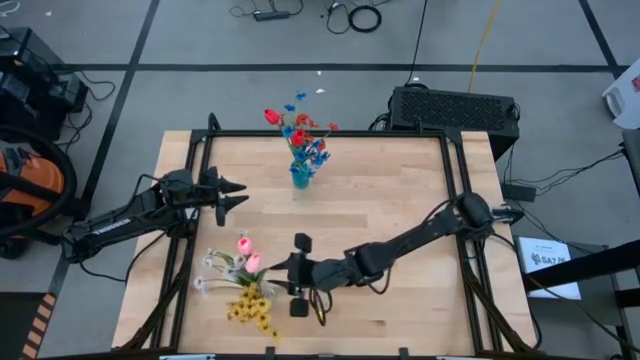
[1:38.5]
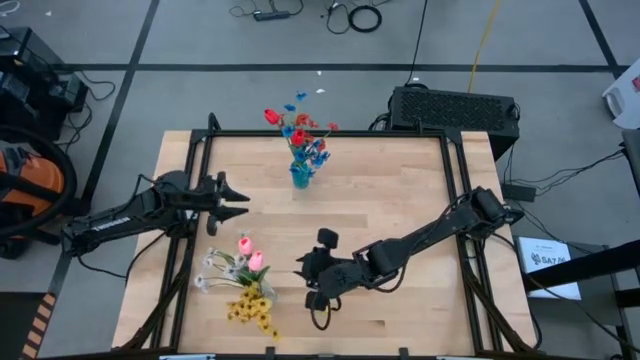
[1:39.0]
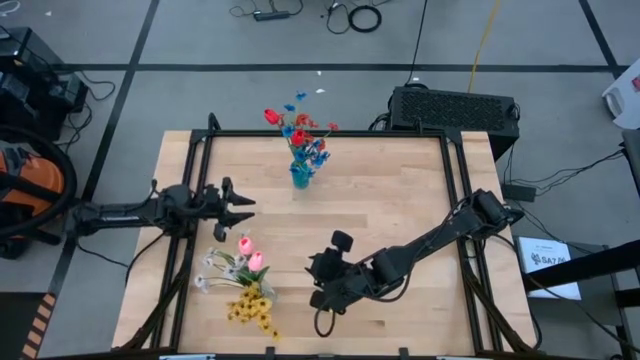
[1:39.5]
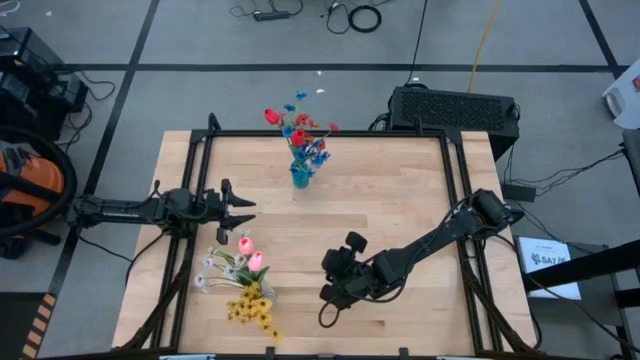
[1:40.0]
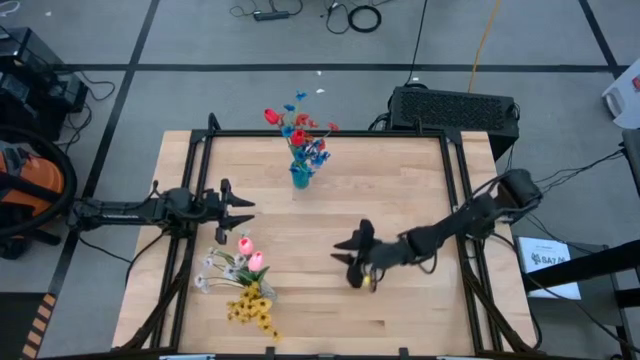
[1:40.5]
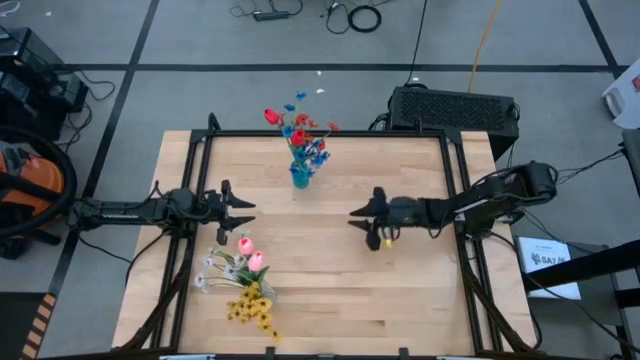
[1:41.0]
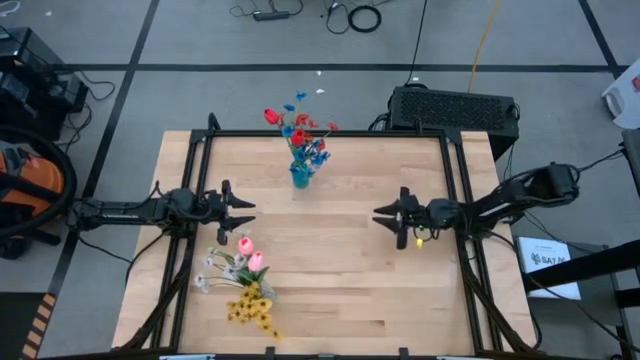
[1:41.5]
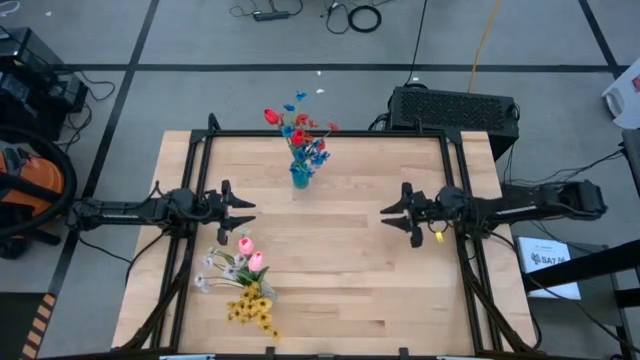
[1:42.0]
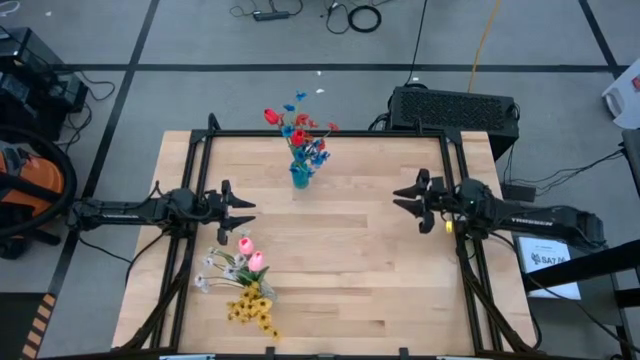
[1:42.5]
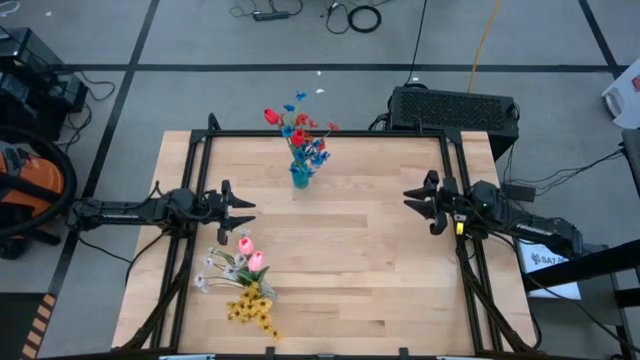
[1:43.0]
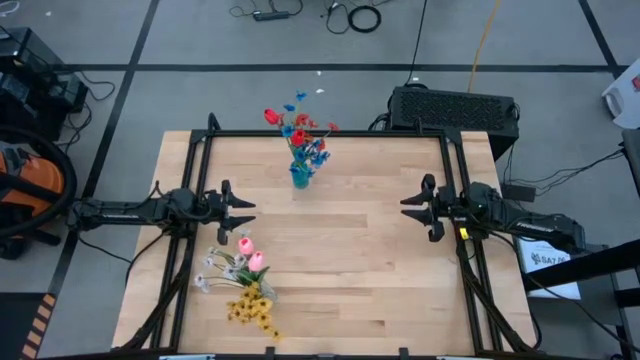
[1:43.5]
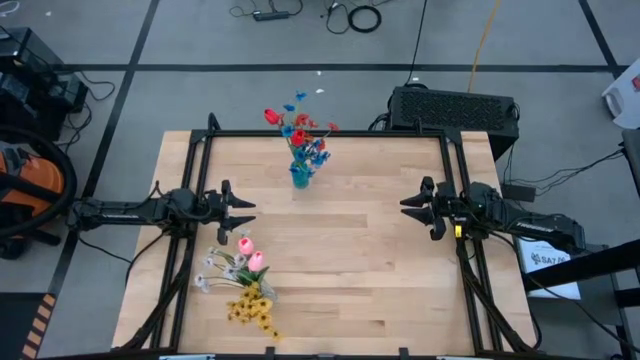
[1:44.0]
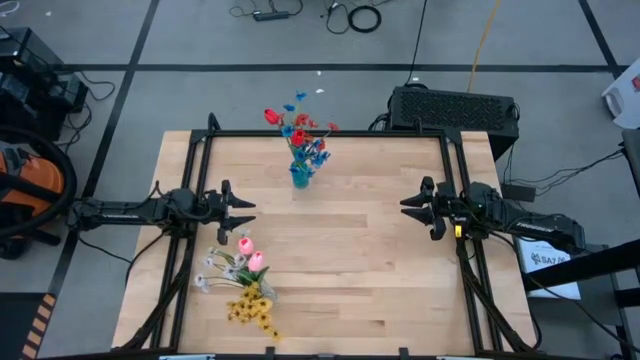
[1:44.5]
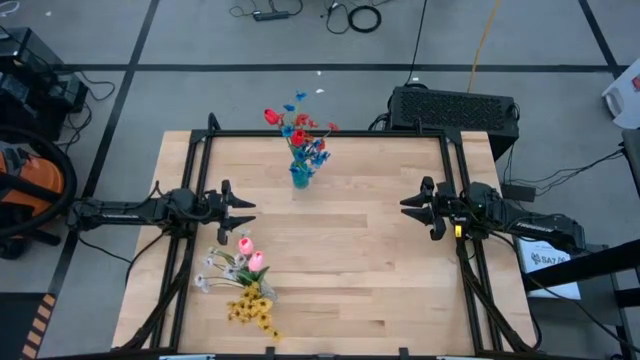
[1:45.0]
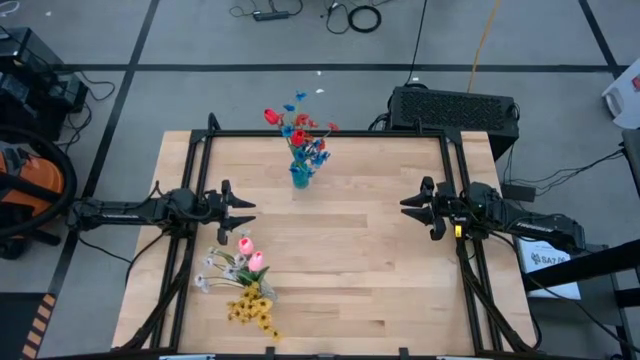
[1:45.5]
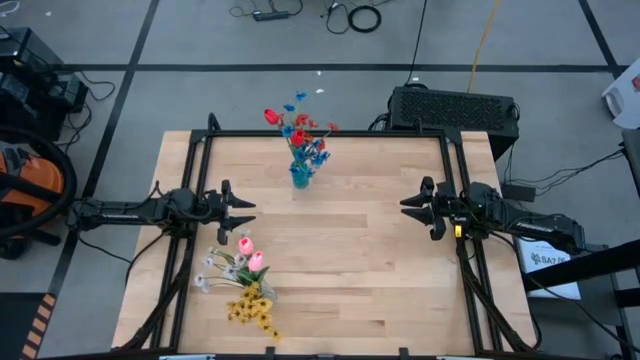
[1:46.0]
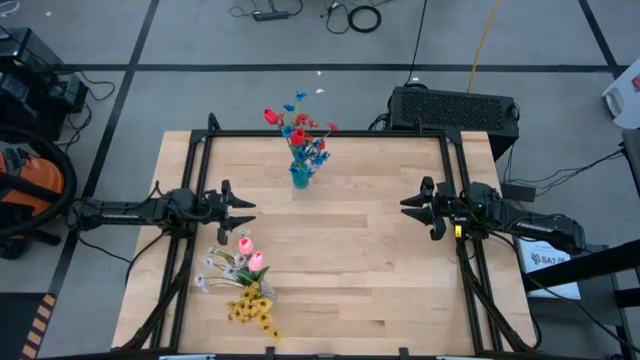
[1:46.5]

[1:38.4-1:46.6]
Task: Sort flowers into vase by color
Return to Home Position

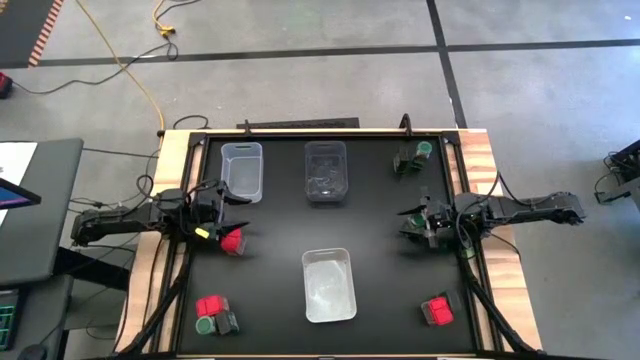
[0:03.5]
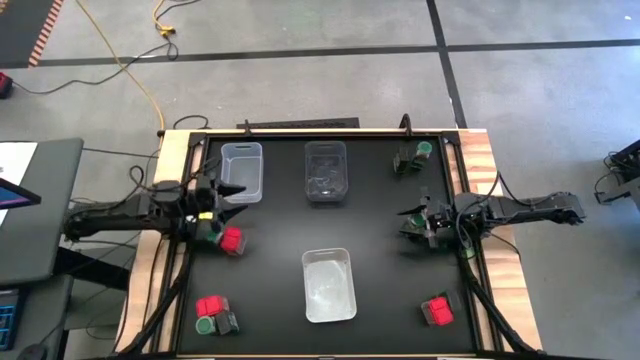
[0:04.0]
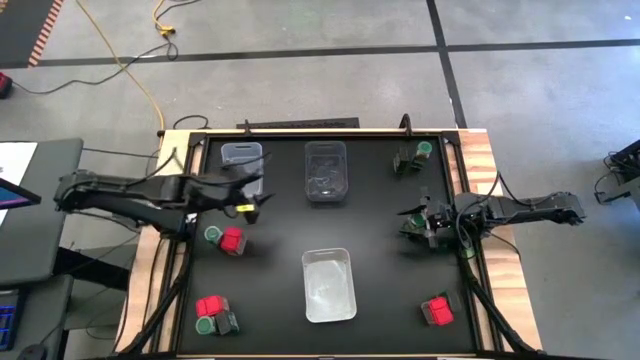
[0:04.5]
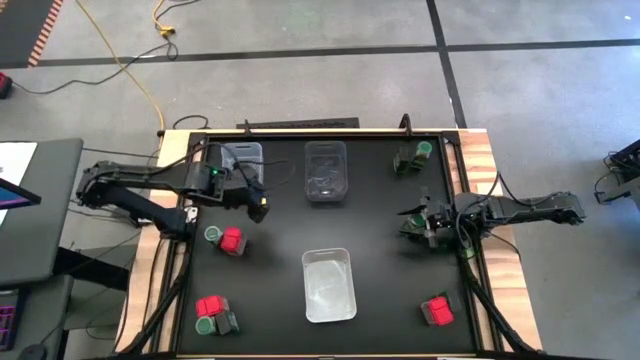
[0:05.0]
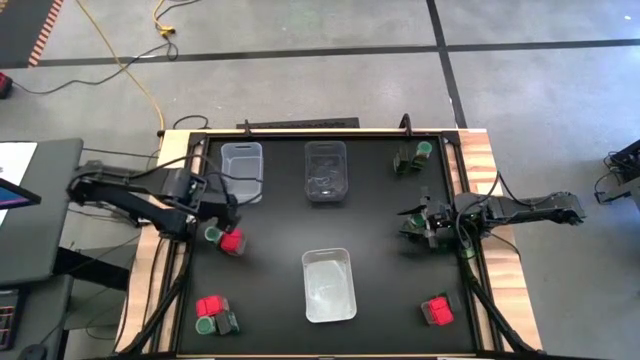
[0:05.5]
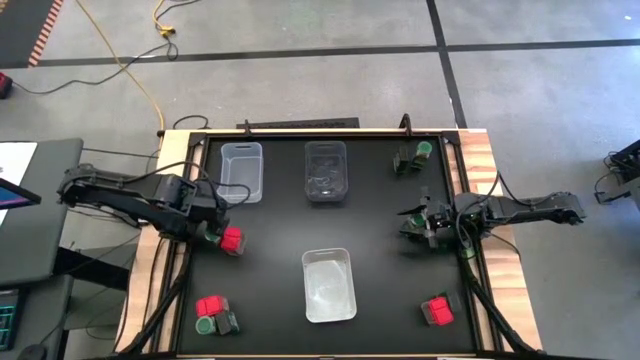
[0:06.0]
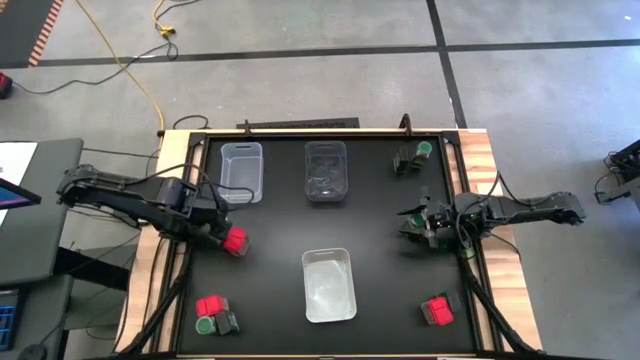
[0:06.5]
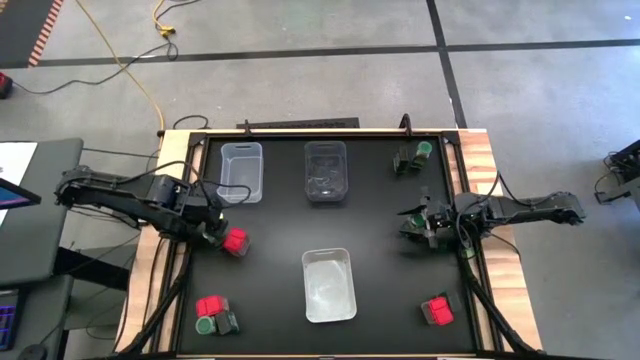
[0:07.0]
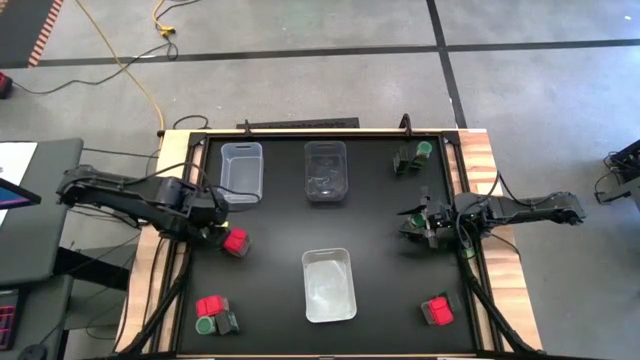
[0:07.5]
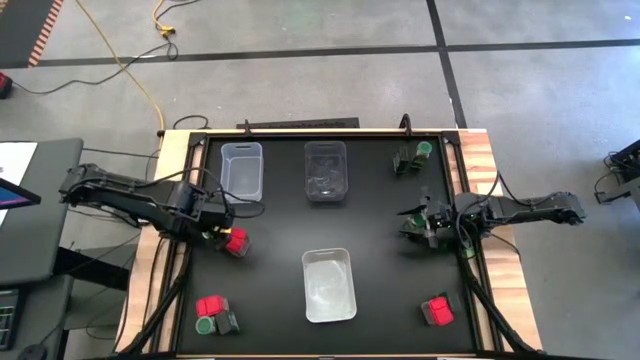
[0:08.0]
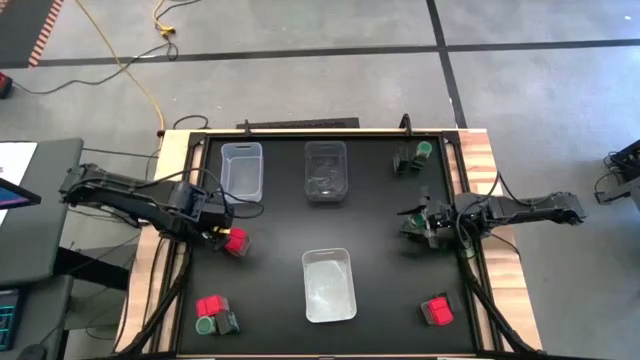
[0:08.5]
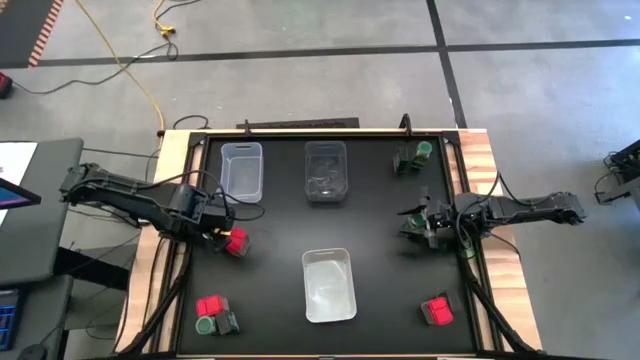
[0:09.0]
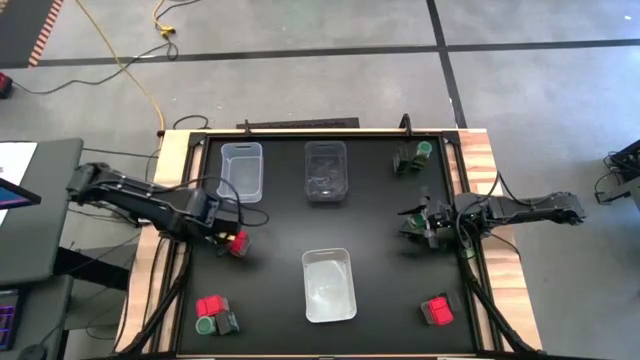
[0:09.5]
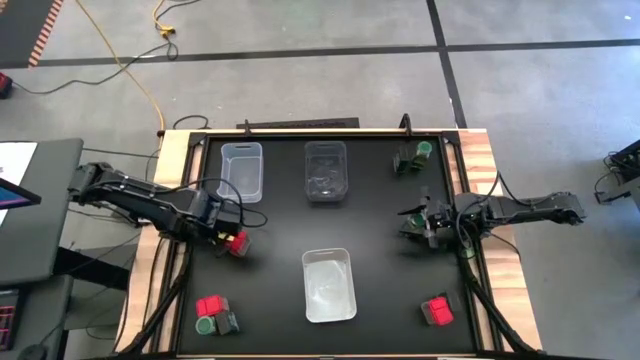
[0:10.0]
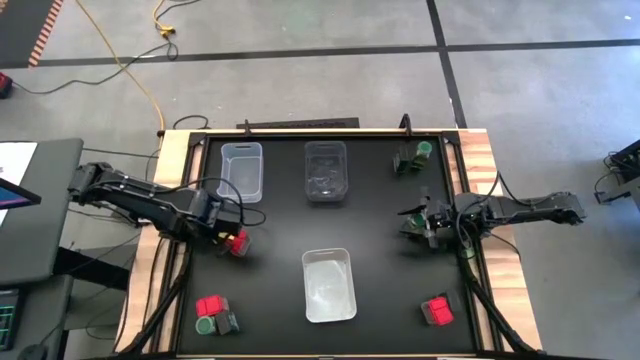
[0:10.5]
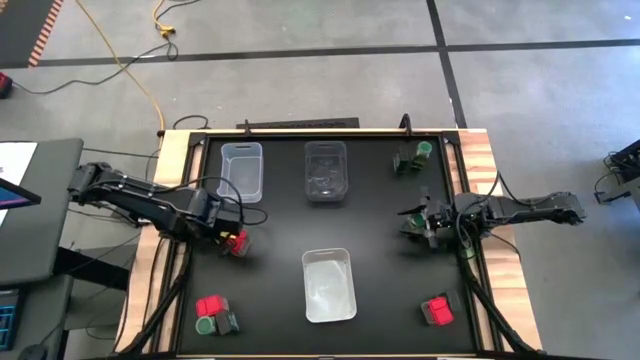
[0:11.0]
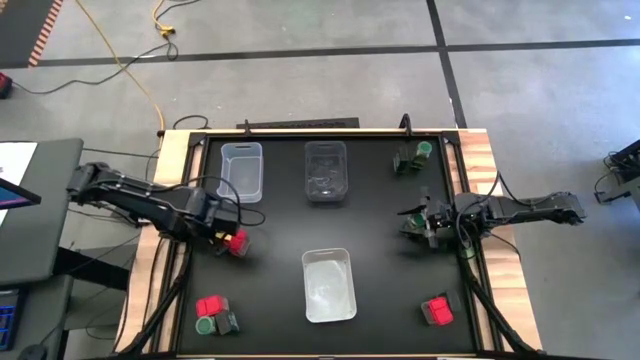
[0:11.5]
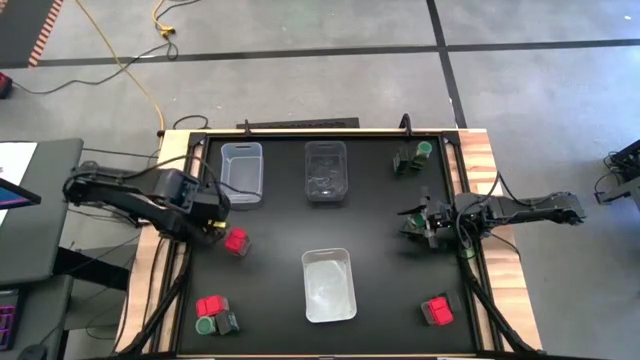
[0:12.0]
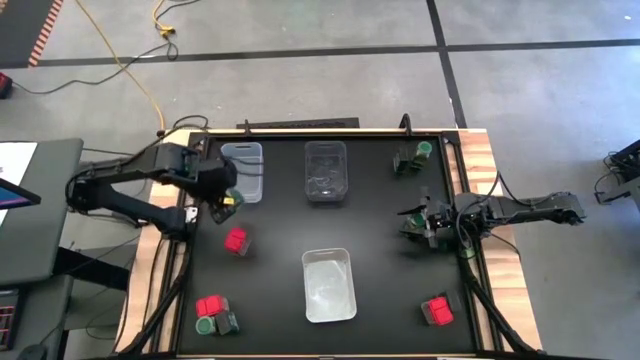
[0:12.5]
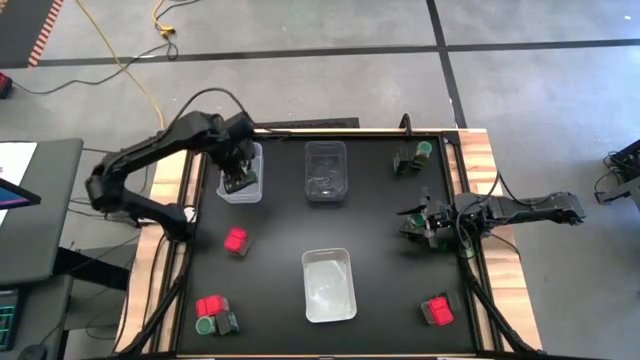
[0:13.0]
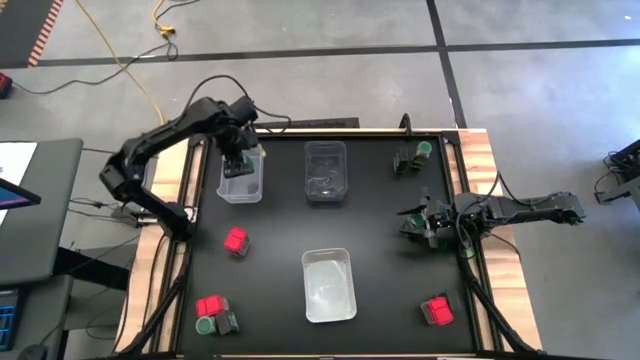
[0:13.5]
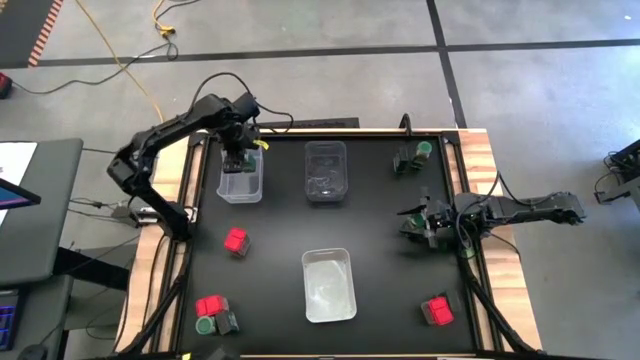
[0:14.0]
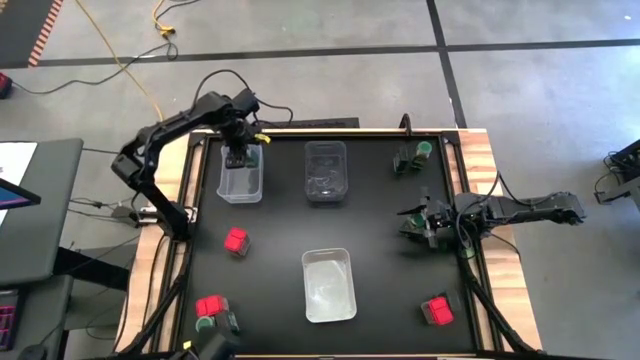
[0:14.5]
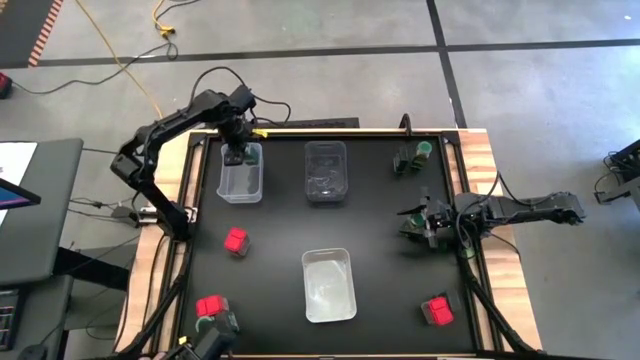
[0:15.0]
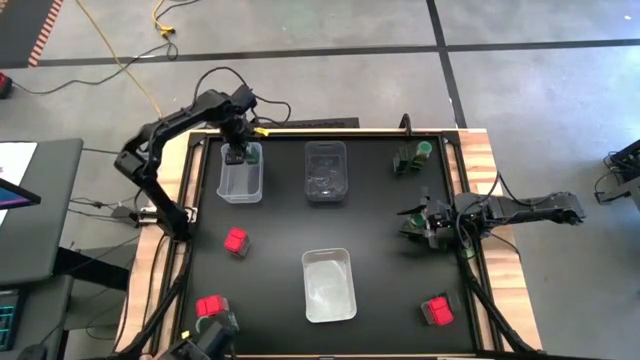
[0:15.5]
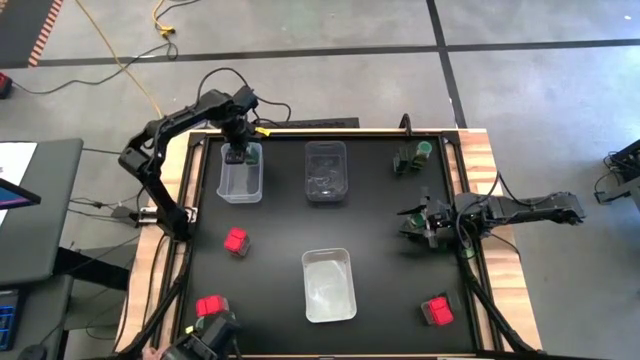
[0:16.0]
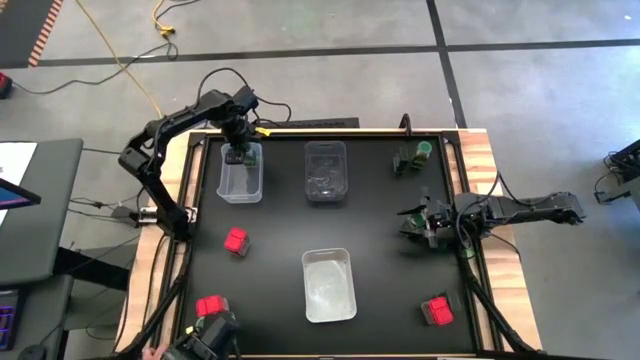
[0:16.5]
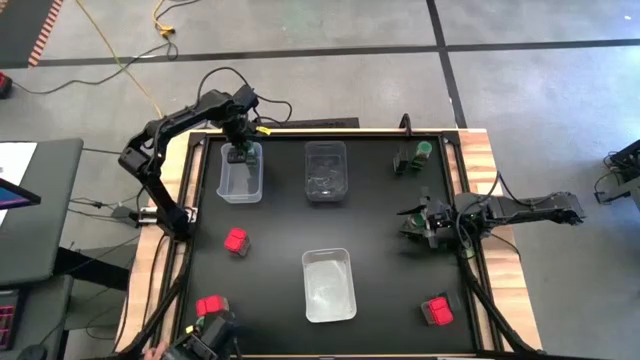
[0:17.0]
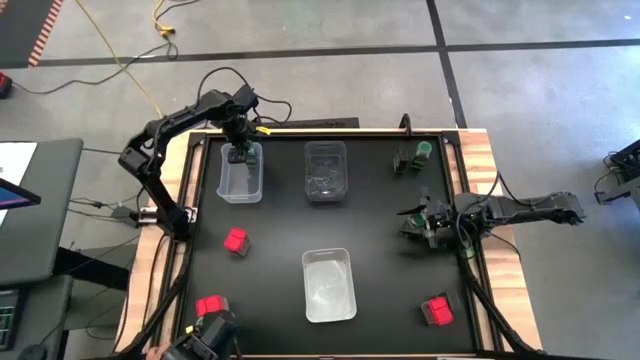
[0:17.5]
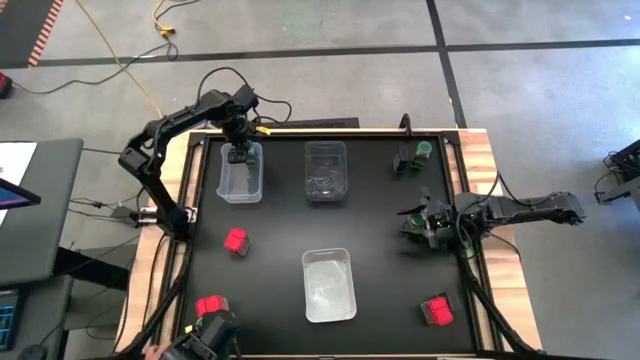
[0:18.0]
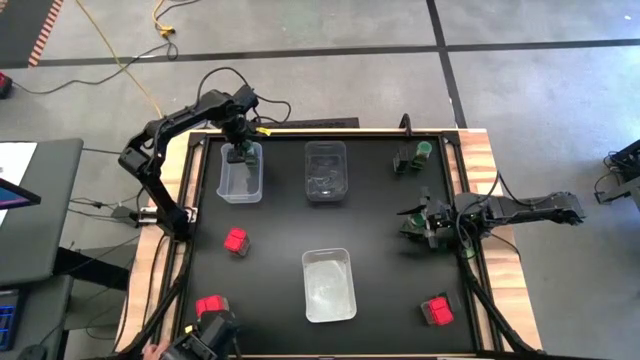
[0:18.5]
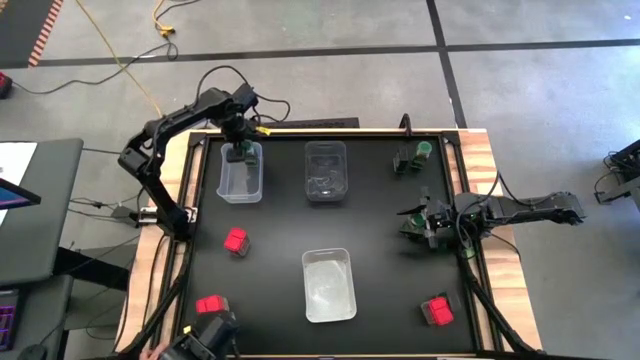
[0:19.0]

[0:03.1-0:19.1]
Task: Sort spices by type
Put the middle left green seasoning bottle into the transparent bin
